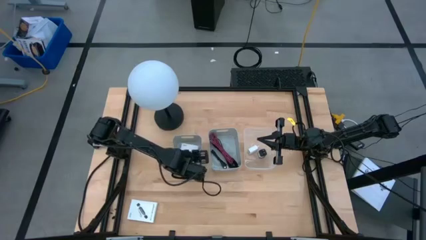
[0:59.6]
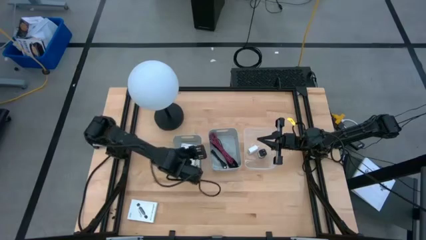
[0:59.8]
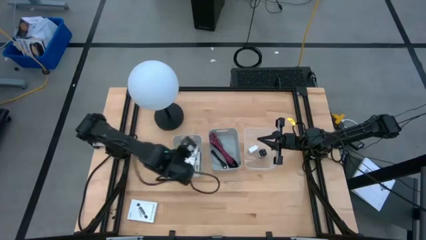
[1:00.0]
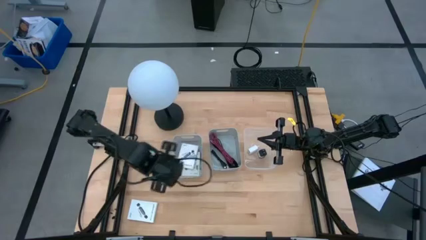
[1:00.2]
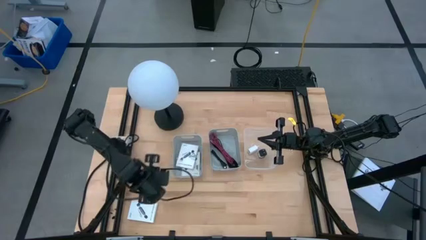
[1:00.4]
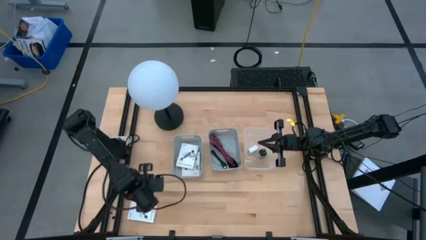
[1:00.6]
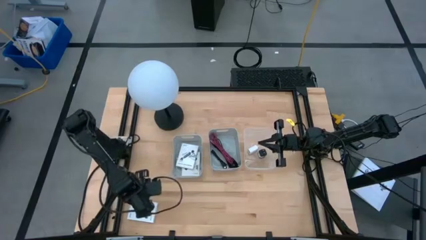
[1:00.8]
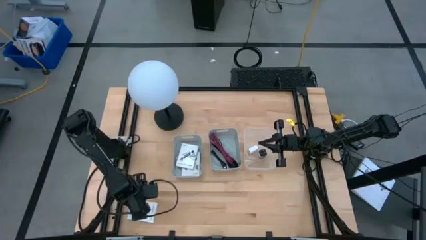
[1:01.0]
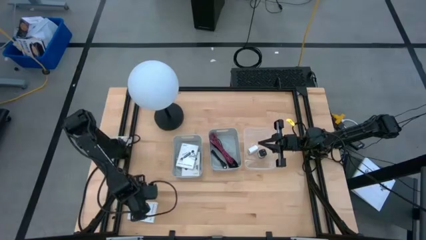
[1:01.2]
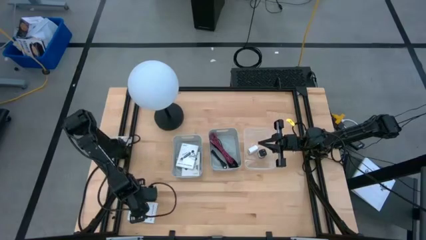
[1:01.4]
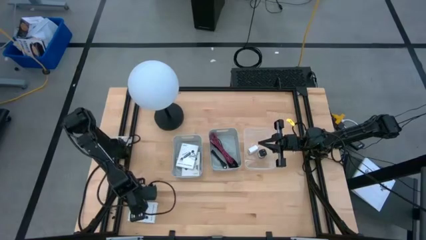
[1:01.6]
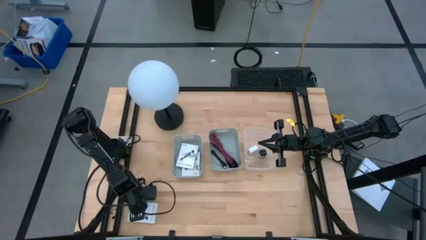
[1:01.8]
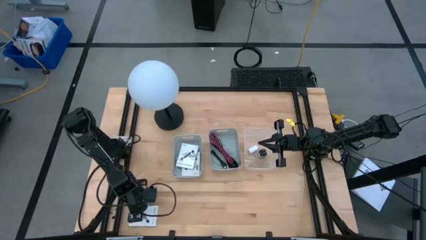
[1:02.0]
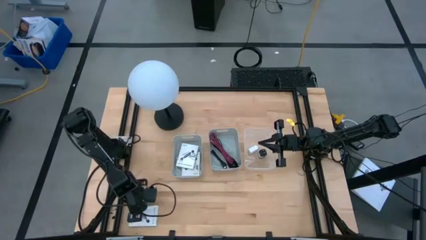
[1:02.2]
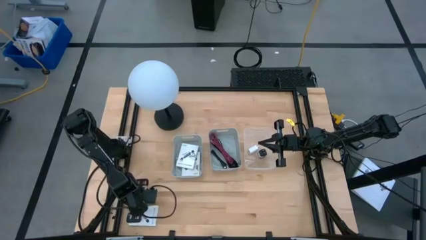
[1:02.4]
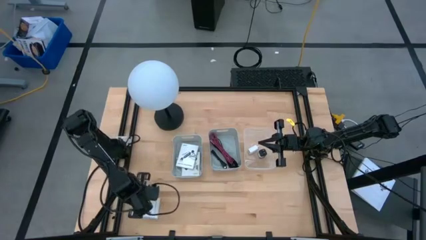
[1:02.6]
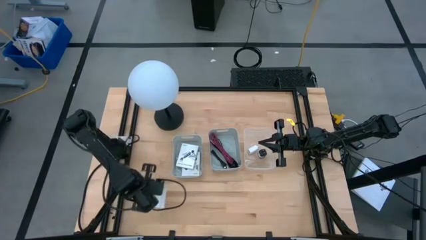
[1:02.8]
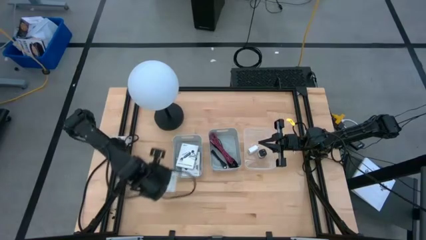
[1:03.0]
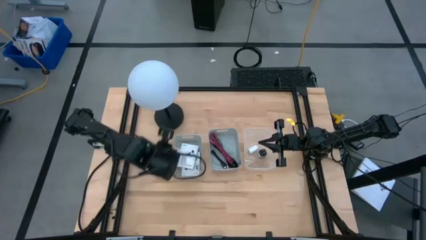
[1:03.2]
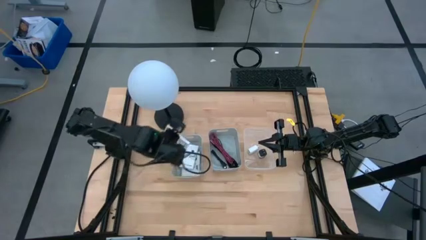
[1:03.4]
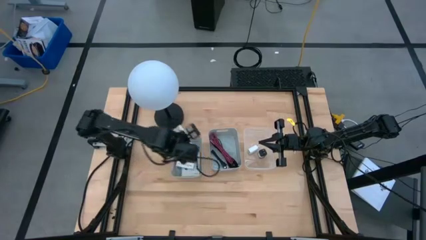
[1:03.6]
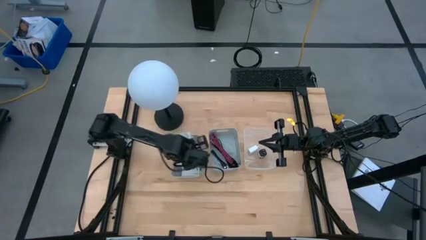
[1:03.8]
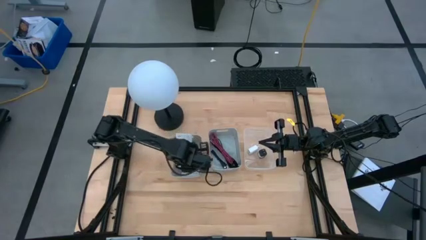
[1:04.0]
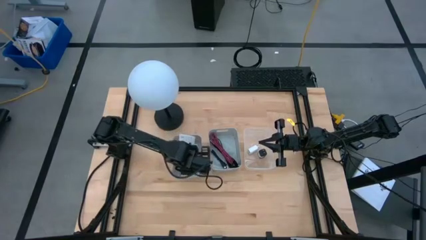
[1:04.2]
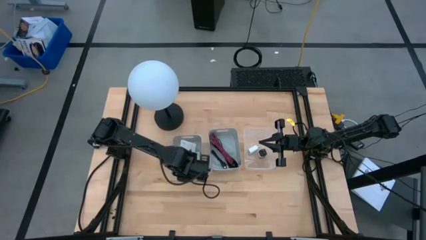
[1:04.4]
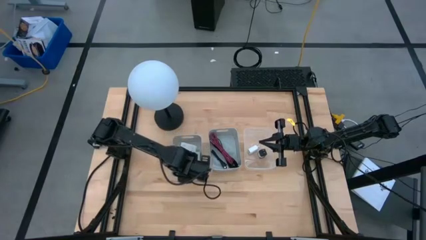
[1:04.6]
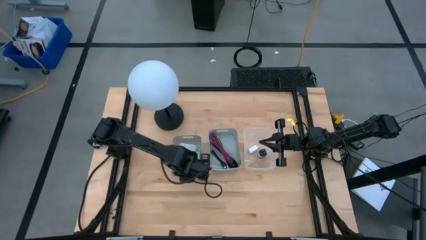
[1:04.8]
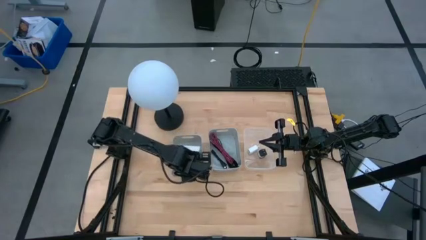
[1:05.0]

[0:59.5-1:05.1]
Task: Pick and place items into bin
Put the card reader box into the left gray bin

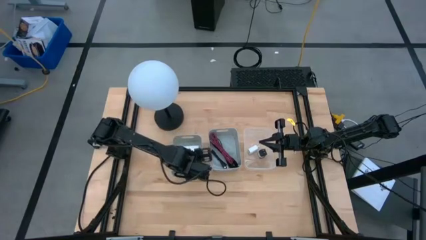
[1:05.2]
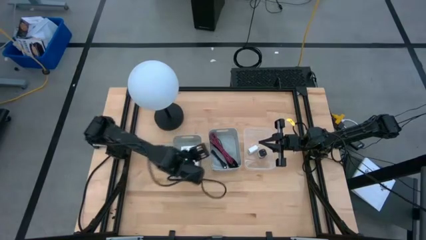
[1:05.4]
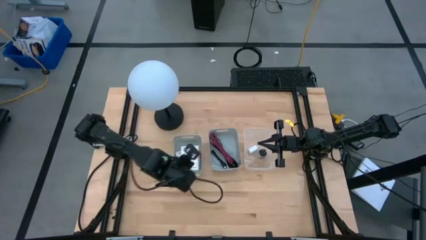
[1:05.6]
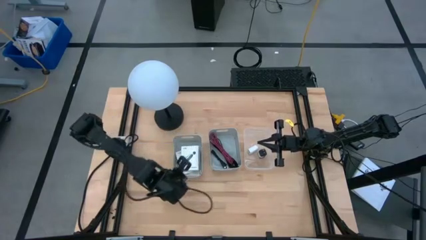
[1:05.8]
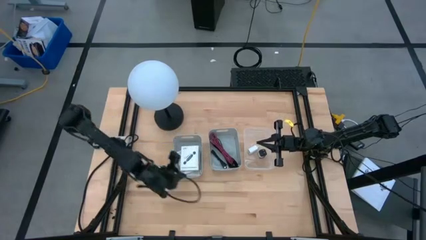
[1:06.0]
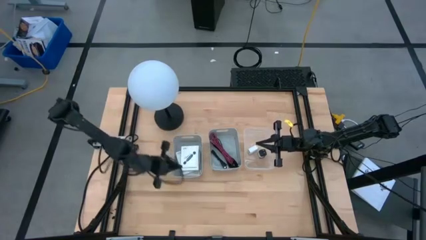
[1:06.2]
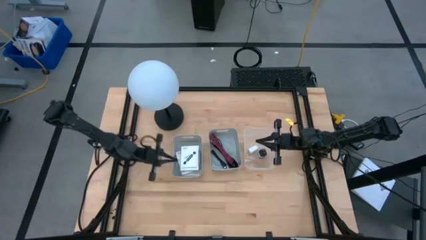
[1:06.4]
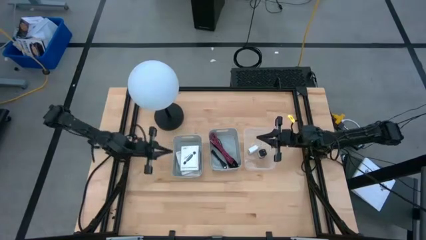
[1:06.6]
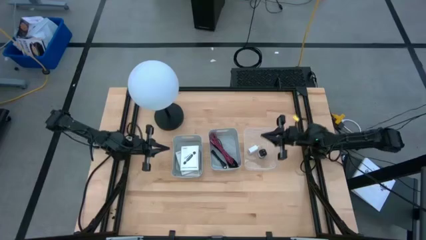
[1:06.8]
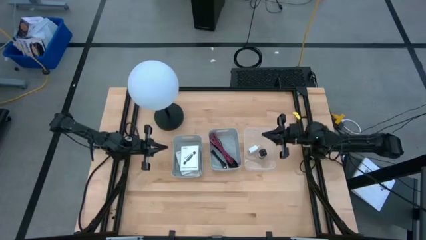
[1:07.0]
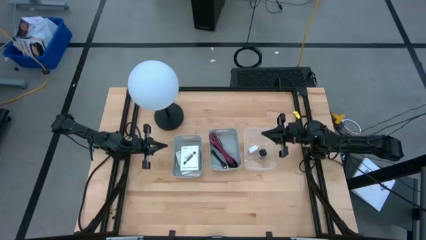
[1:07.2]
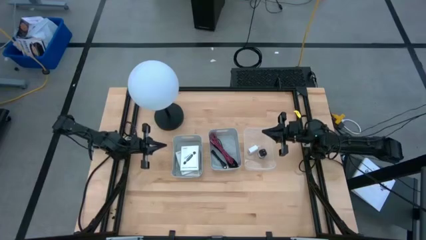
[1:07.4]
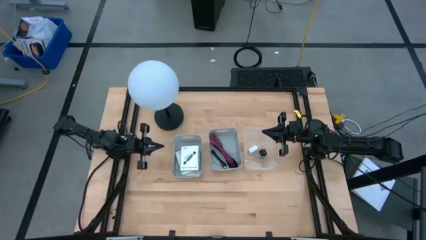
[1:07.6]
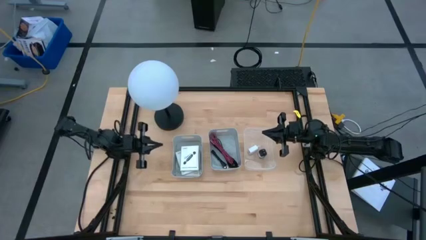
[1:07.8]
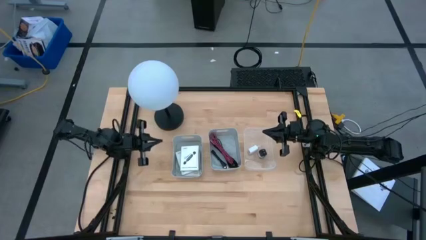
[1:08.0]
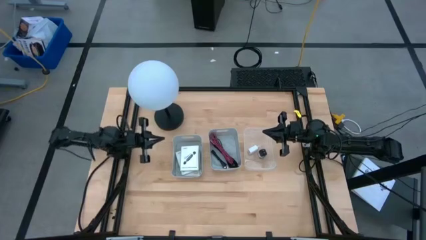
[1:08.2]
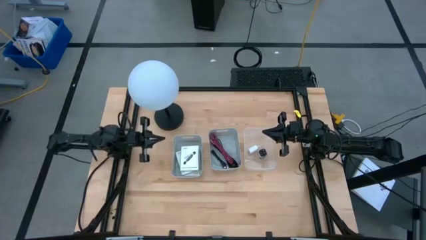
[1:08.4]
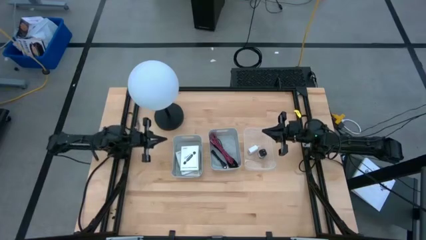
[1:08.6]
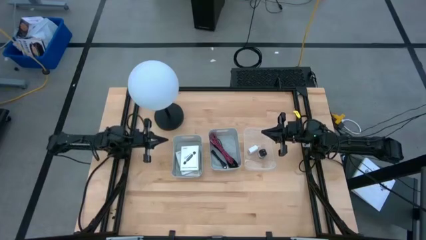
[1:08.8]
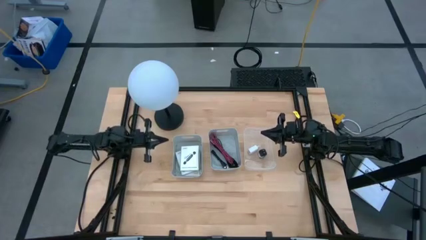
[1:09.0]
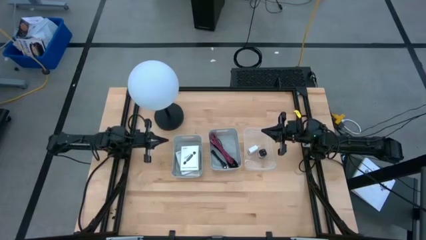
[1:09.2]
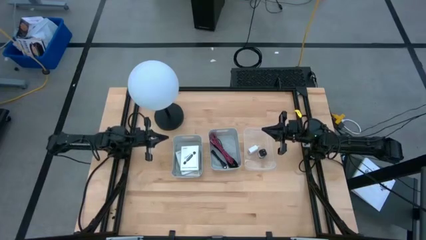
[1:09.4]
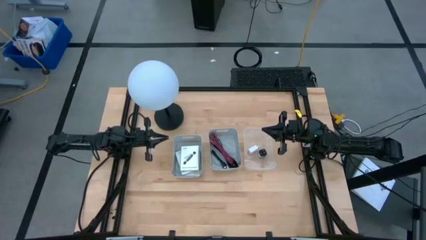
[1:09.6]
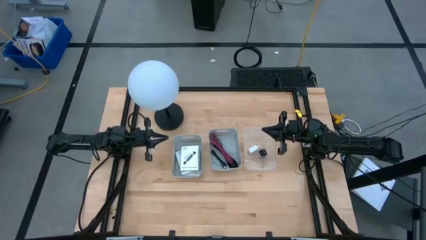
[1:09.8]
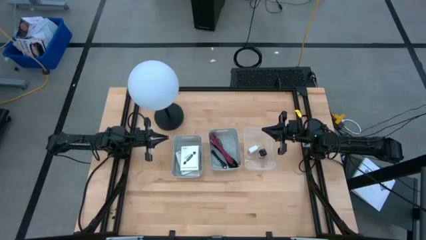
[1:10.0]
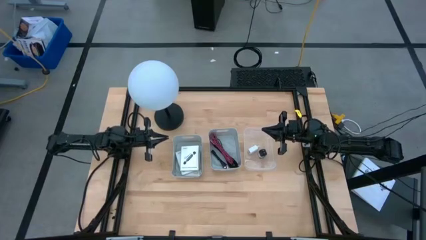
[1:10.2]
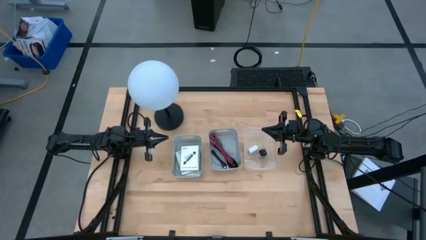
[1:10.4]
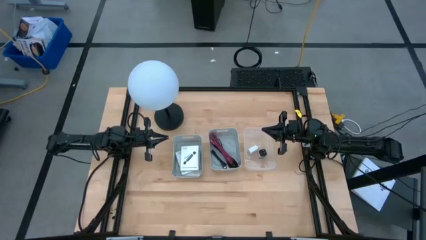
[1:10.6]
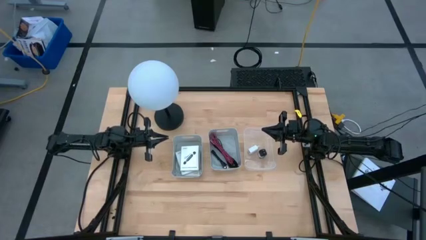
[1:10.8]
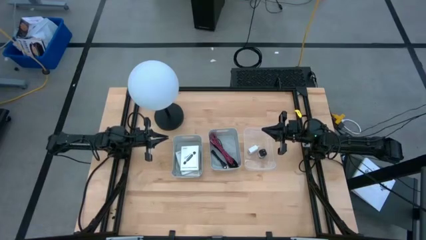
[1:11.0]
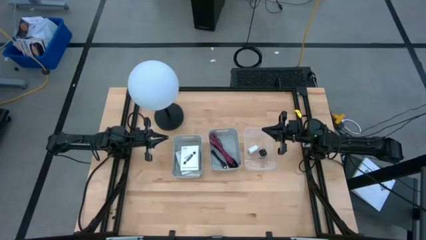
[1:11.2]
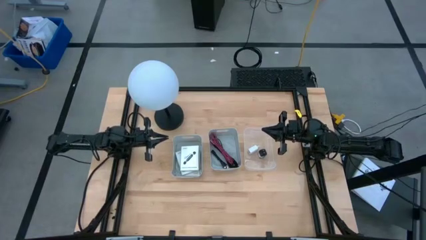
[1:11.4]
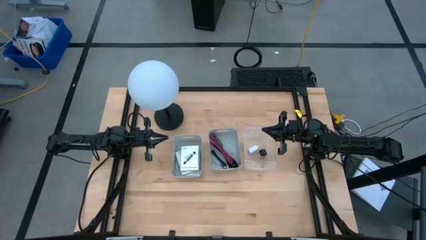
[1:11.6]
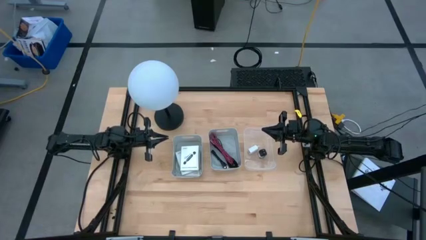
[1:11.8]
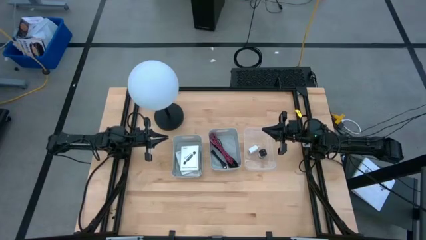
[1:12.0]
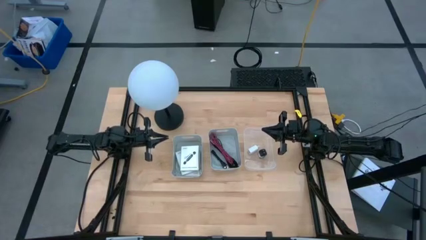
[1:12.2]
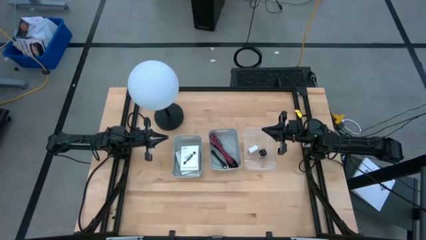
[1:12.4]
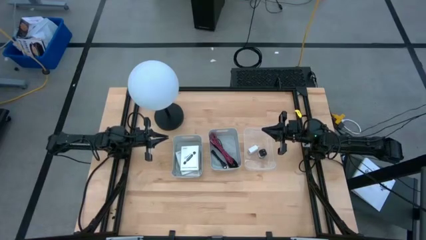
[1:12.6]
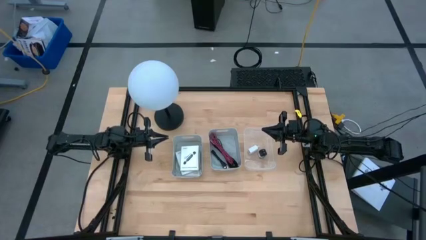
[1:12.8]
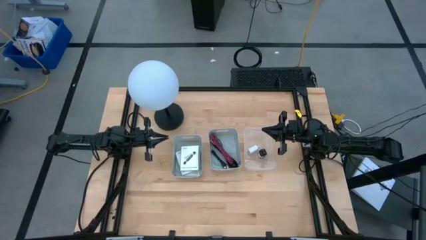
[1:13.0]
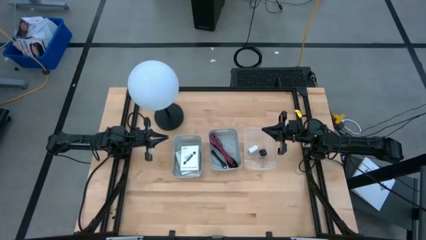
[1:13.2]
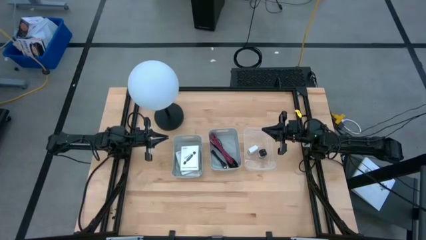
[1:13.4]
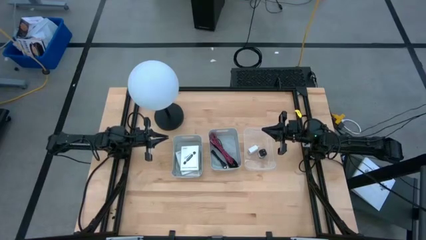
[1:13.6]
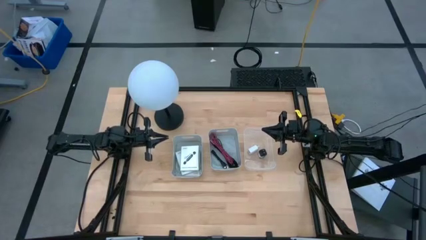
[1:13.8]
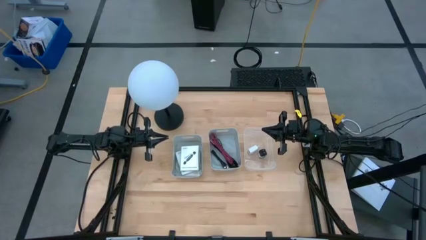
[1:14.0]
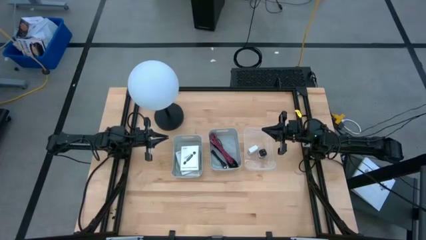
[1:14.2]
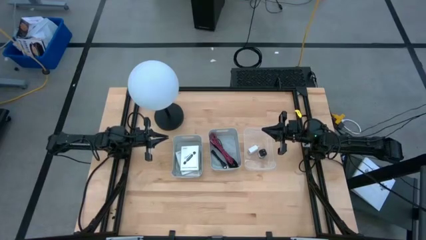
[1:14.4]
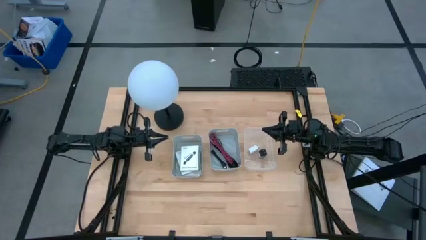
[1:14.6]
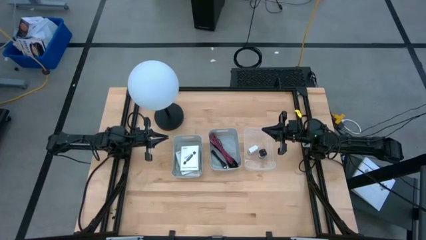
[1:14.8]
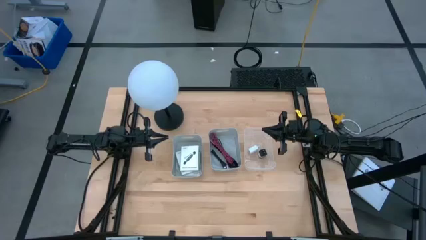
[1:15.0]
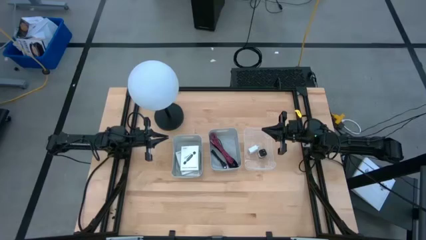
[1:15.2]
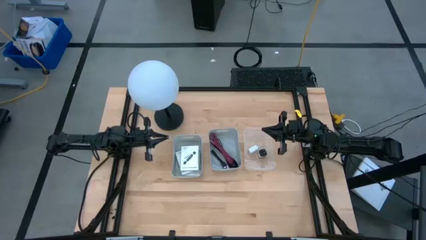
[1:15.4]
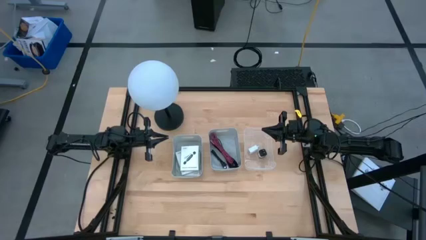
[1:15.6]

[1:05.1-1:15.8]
Return to Home Position
